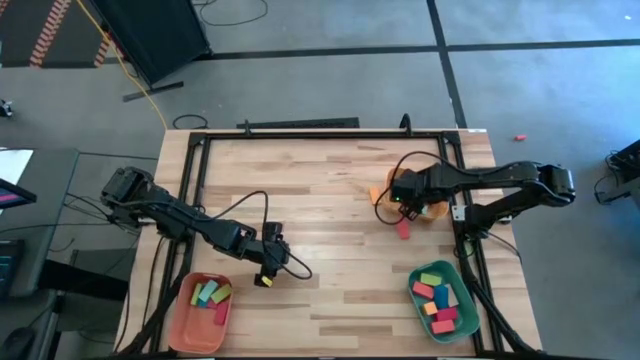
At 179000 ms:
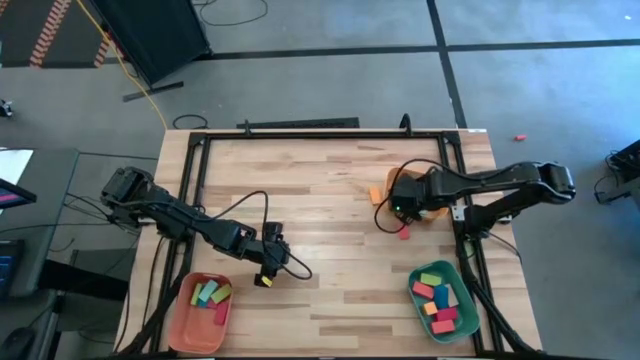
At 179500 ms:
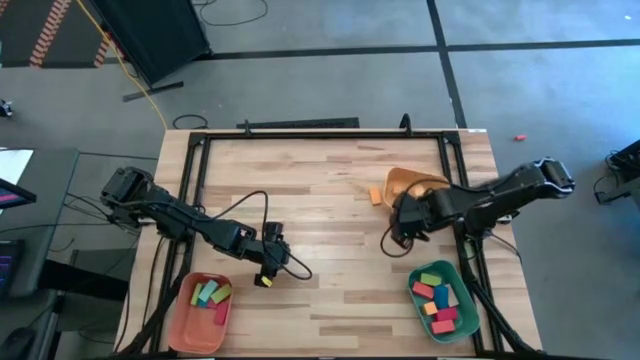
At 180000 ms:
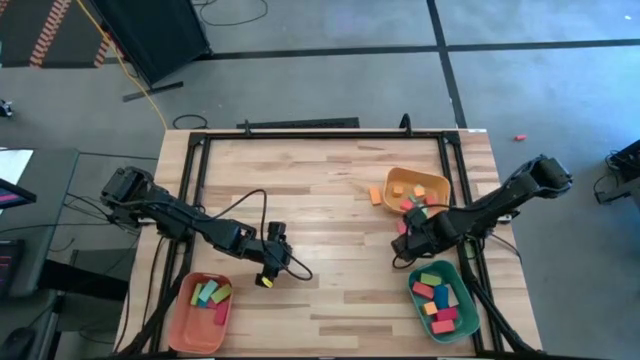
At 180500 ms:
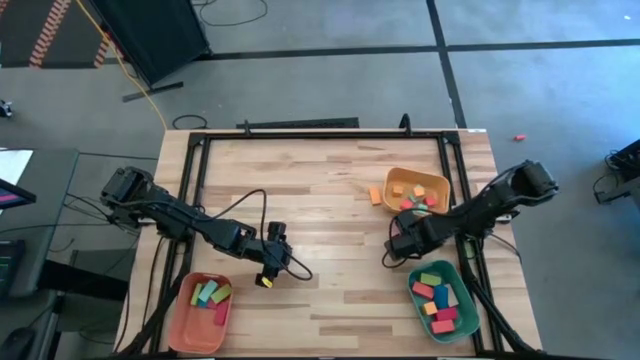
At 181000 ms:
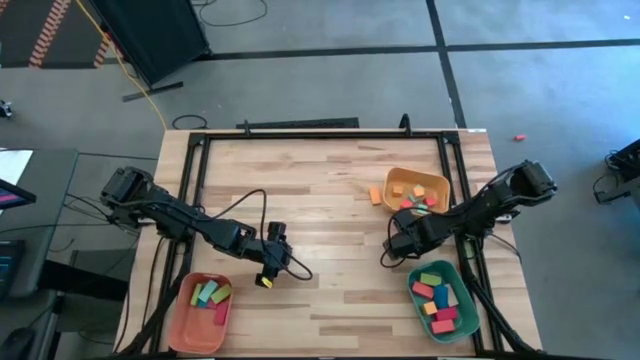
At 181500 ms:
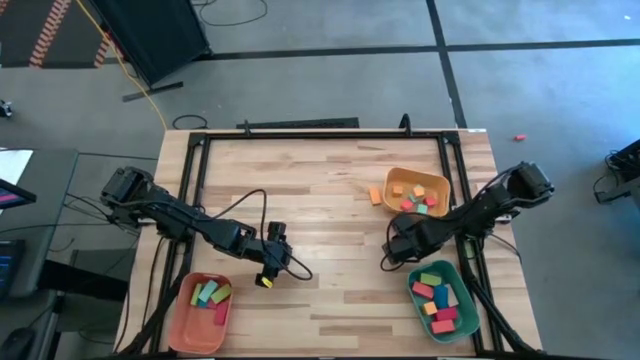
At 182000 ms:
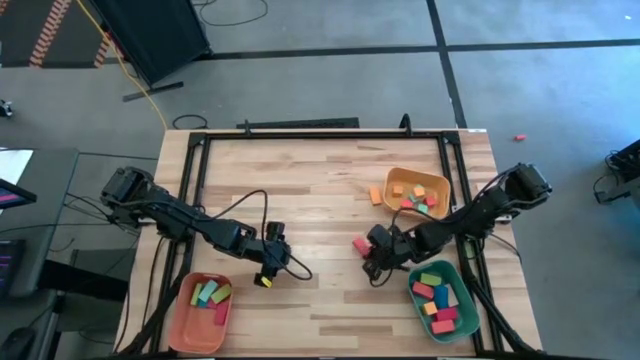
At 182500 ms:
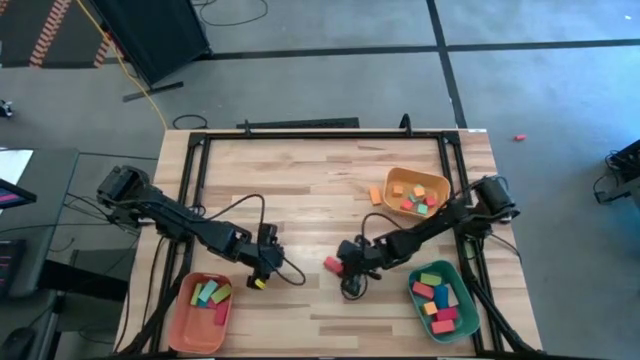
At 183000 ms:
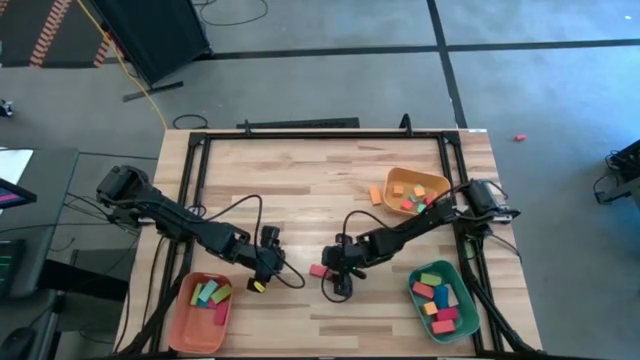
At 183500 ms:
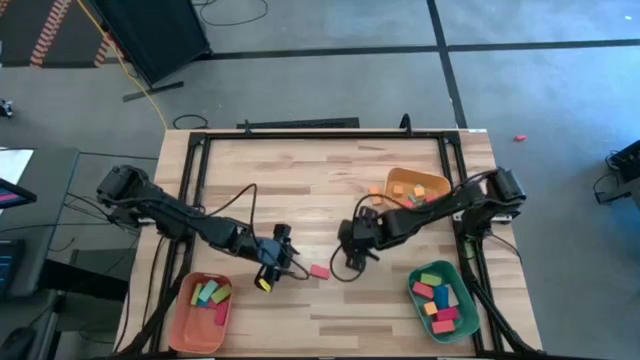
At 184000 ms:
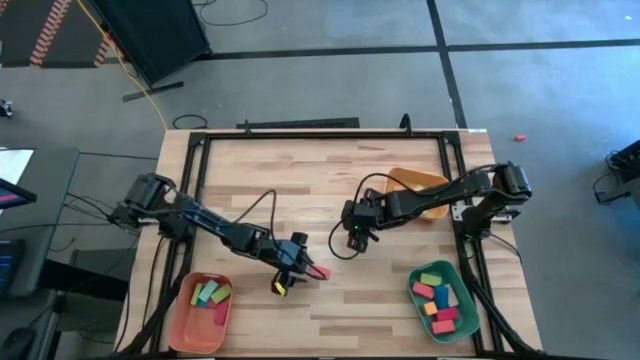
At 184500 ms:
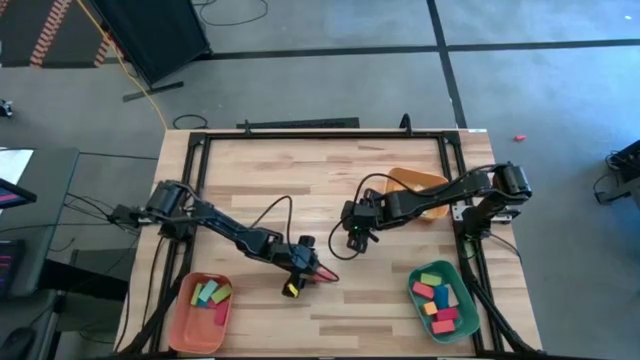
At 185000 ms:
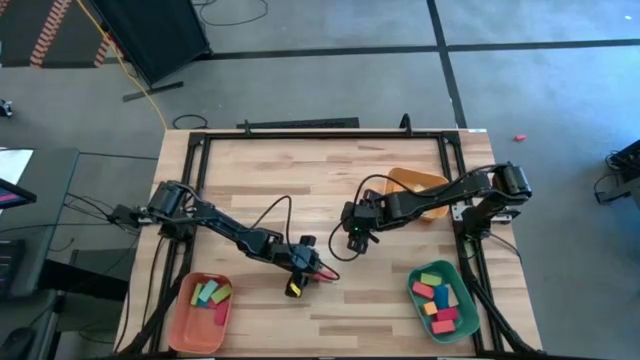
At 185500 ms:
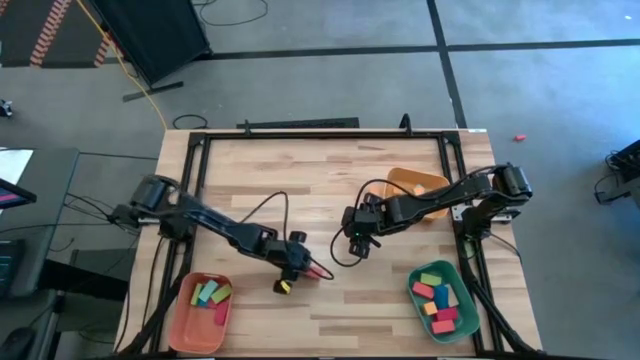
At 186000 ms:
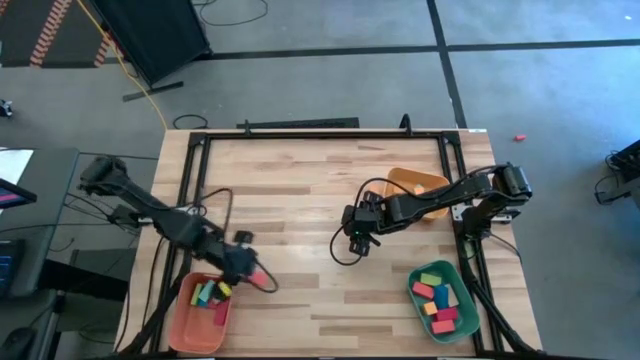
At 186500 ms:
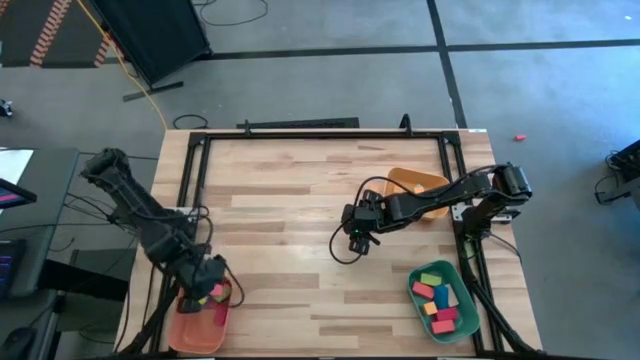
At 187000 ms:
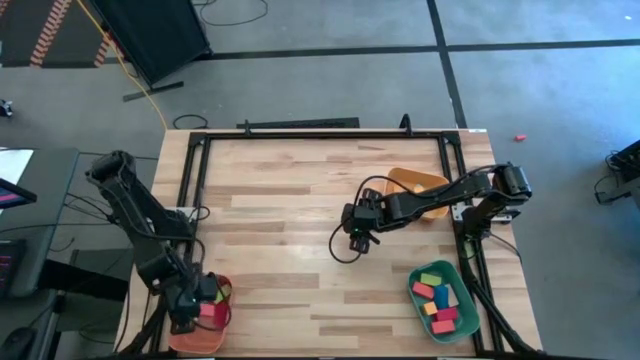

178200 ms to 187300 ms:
Task: Sort blocks by size
Put the medium orange block into the orange bin

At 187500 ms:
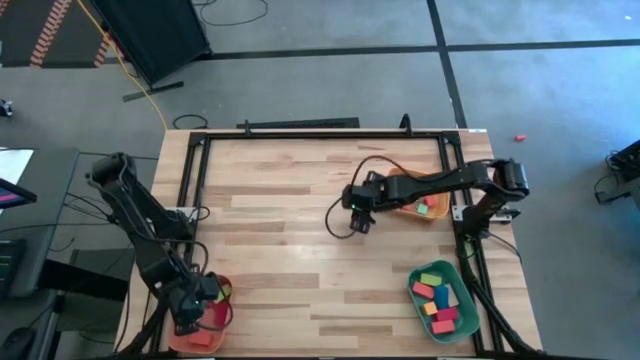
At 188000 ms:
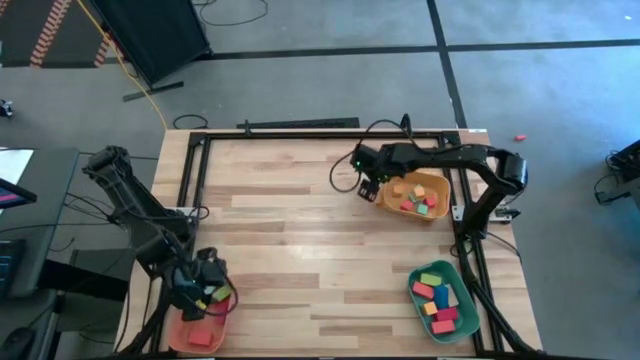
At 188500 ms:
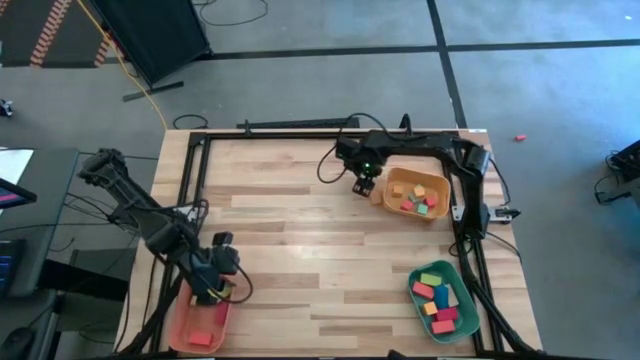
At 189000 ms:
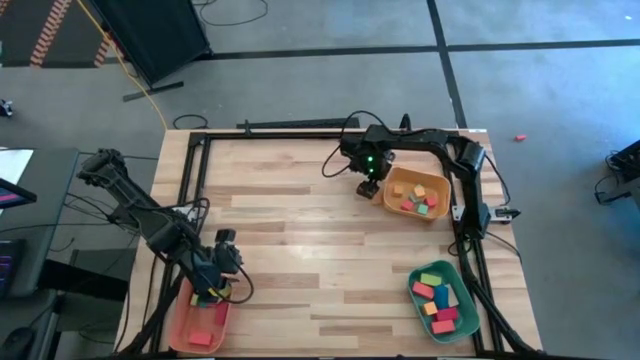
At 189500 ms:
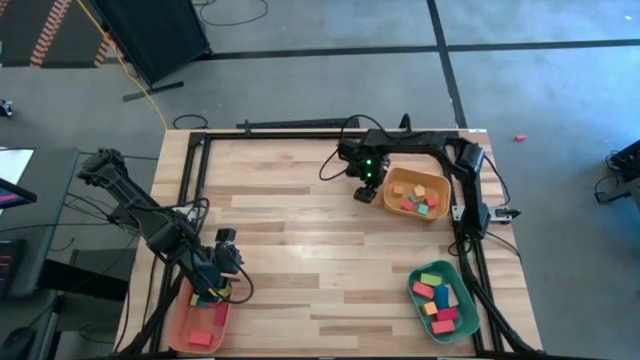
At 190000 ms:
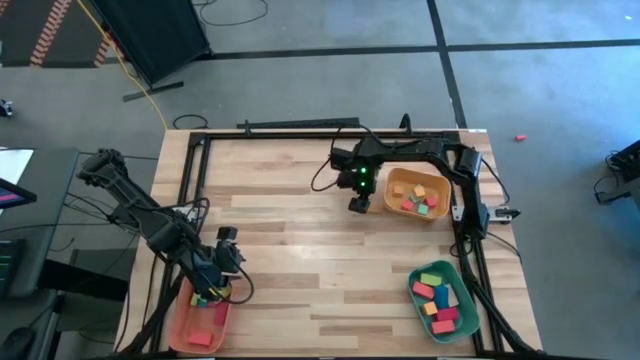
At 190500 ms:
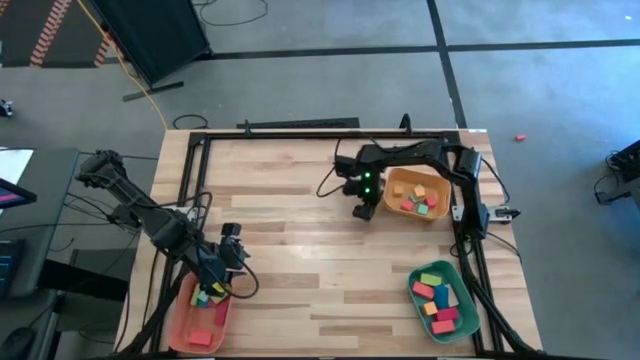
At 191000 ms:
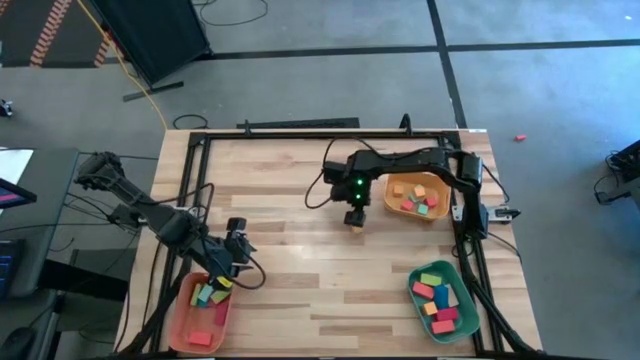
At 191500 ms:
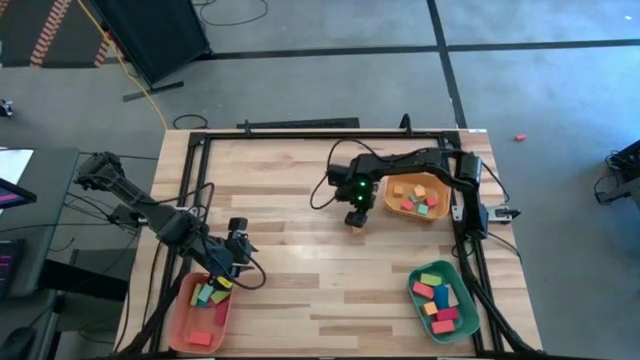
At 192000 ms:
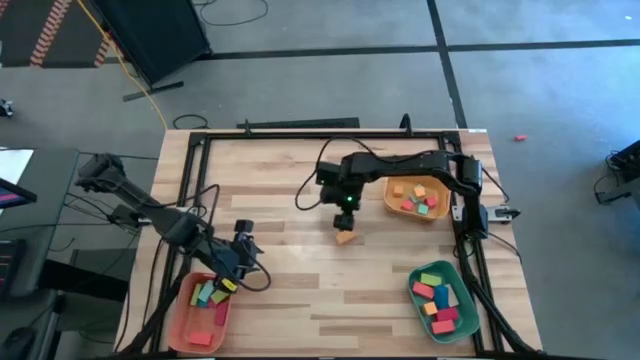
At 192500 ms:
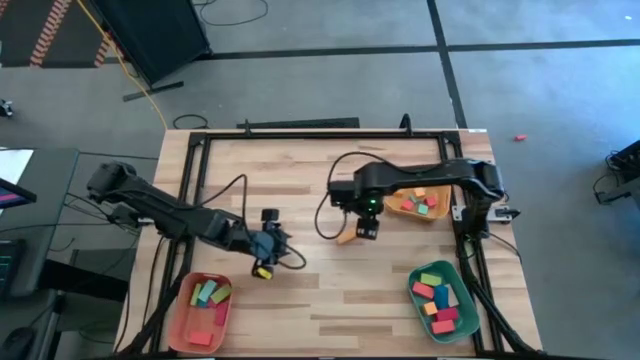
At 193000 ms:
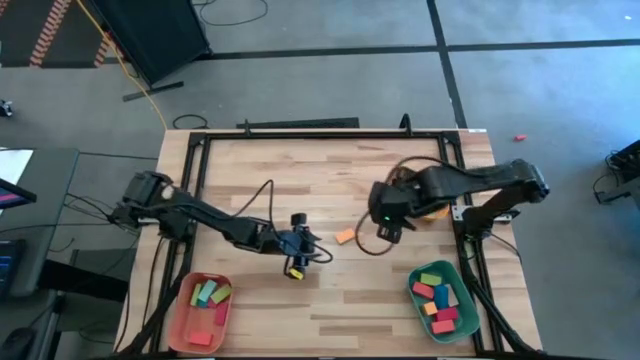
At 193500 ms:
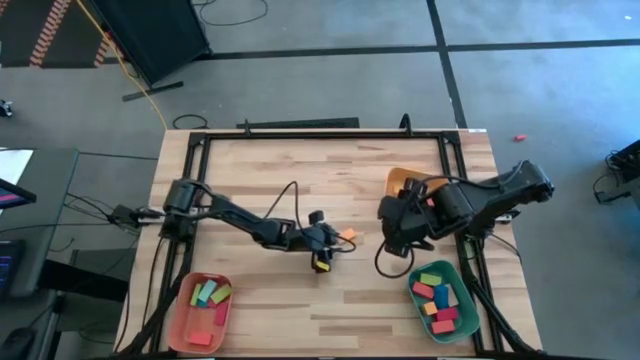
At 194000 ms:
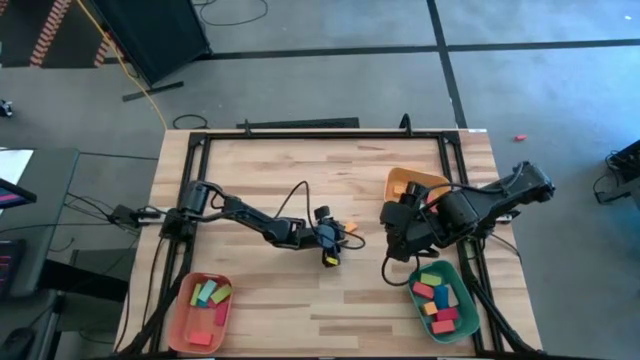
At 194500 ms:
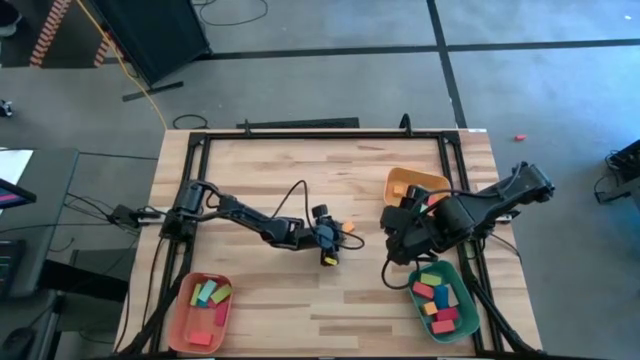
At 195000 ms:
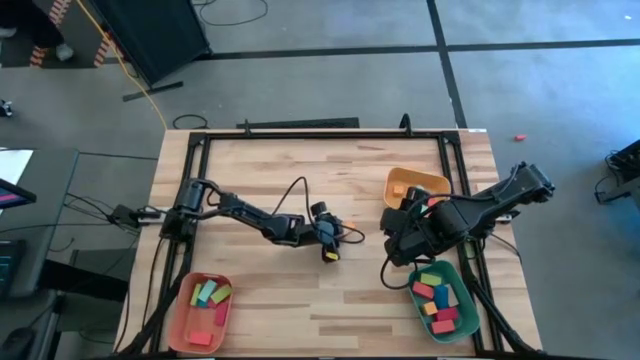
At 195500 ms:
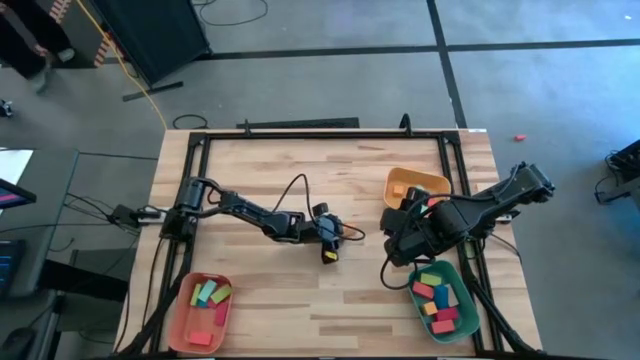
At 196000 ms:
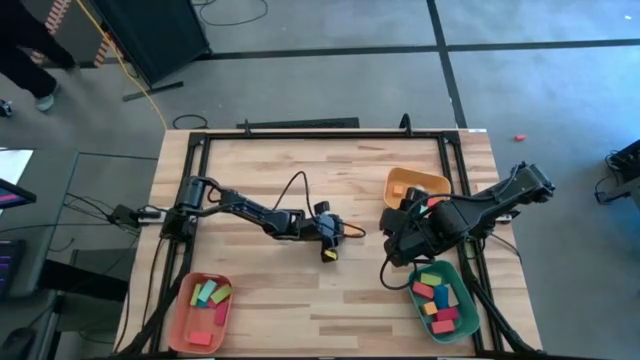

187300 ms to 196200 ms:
Put the medium yellow block into the orange bin

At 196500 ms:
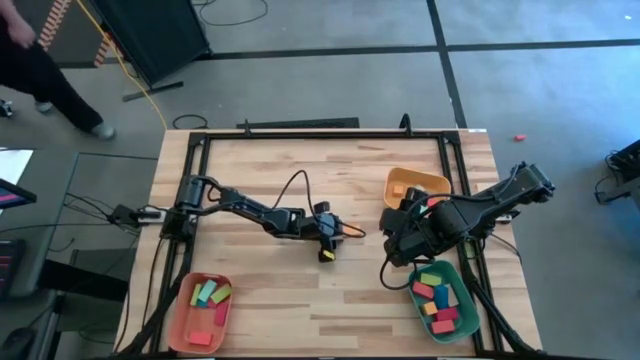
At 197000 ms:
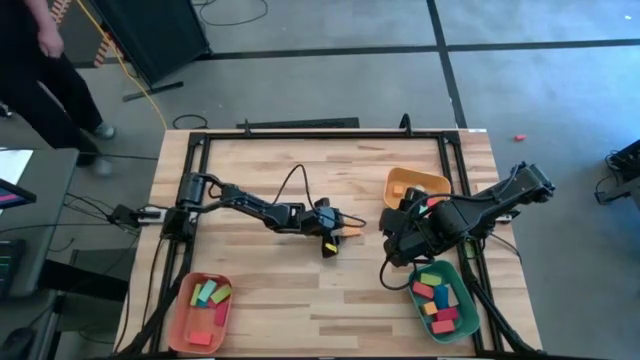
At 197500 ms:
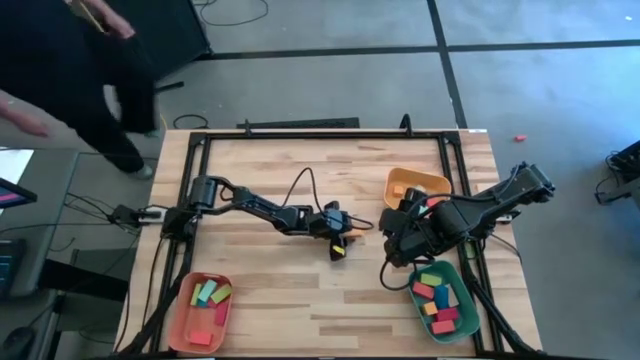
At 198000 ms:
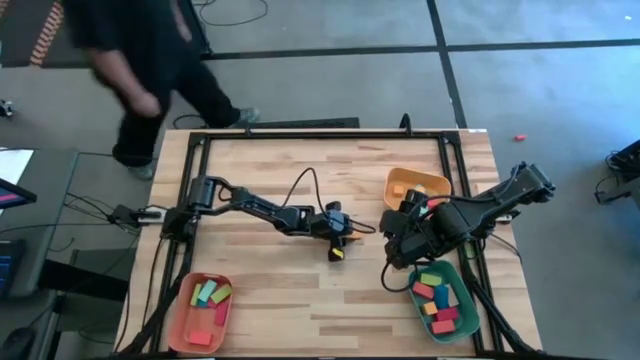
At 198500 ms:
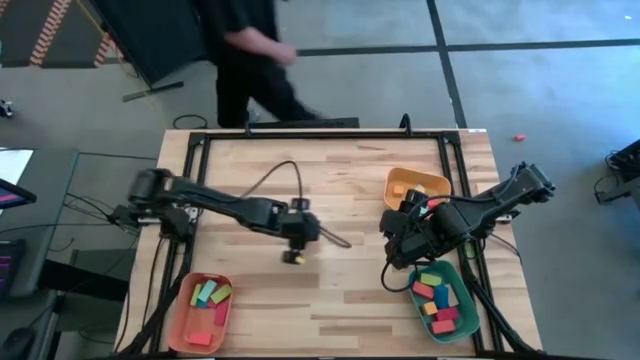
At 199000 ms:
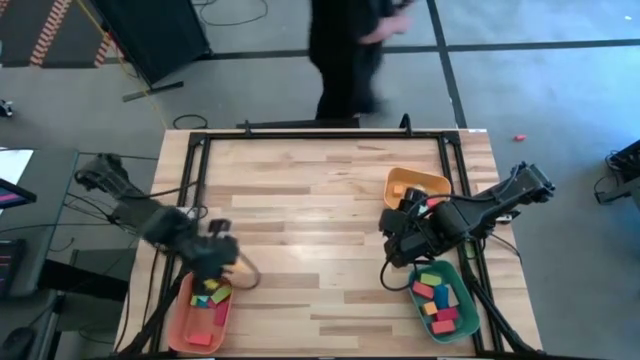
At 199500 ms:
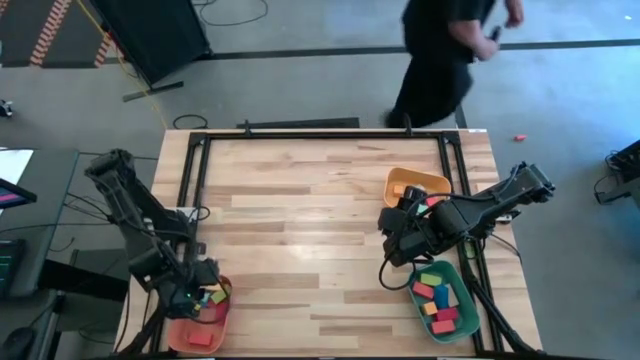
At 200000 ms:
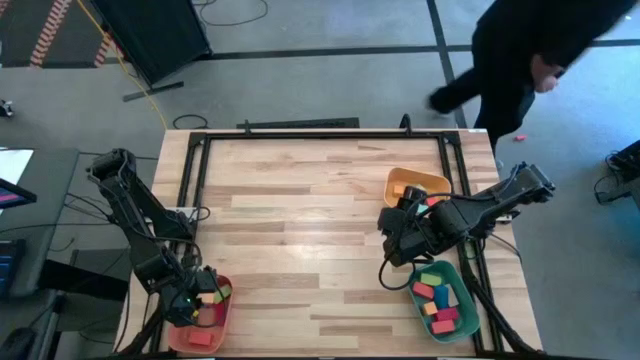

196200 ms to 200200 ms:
Put the medium yellow block into the orange bin
